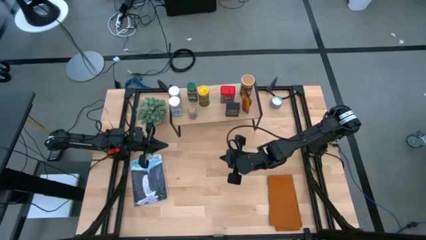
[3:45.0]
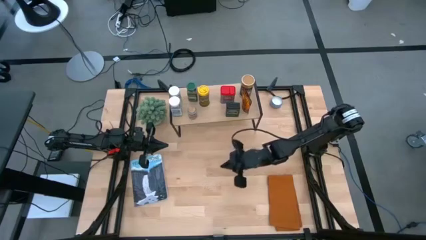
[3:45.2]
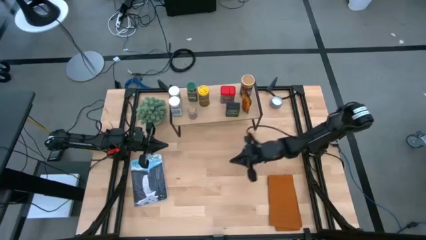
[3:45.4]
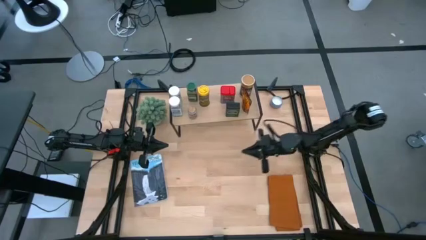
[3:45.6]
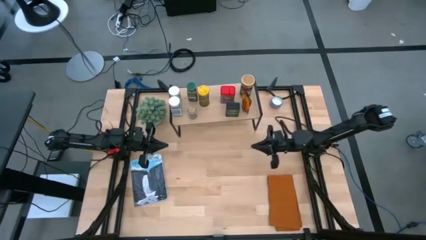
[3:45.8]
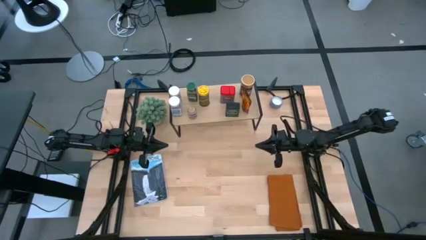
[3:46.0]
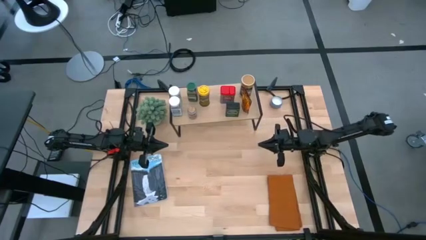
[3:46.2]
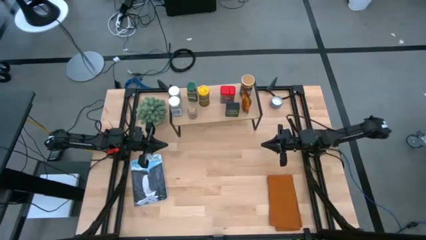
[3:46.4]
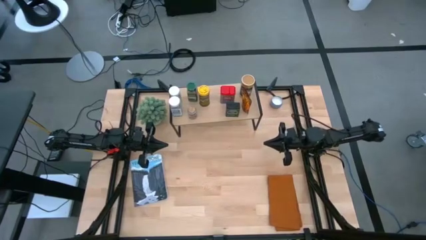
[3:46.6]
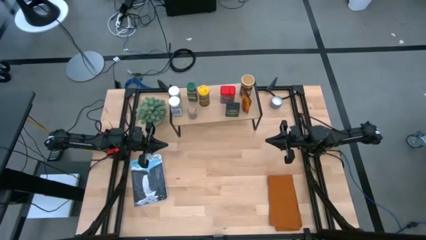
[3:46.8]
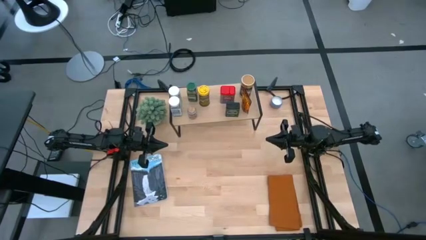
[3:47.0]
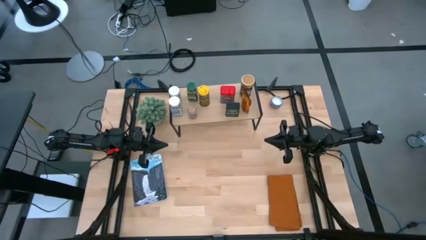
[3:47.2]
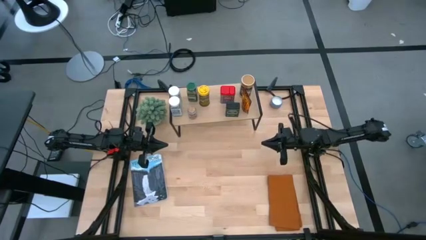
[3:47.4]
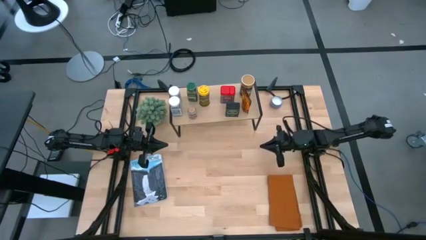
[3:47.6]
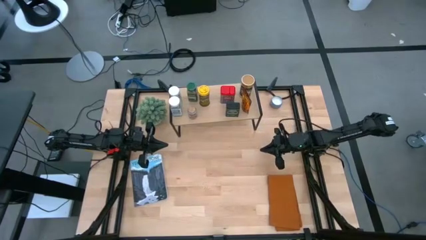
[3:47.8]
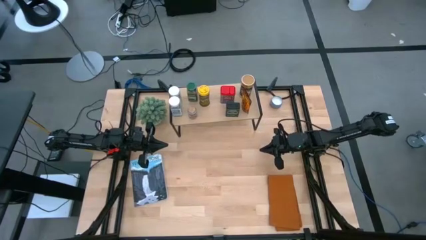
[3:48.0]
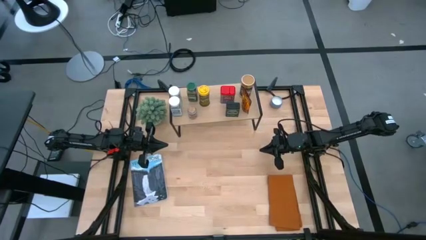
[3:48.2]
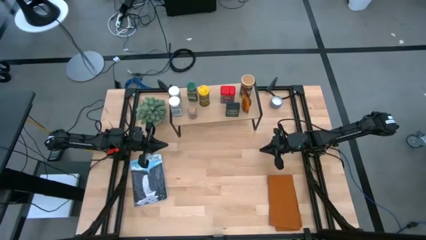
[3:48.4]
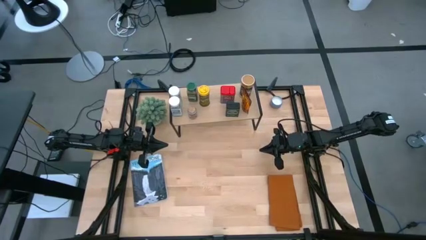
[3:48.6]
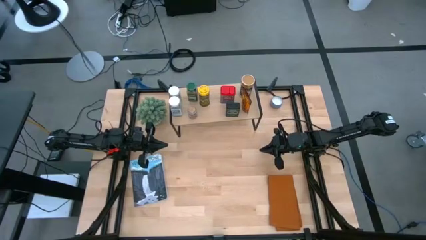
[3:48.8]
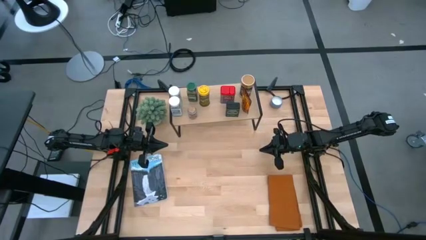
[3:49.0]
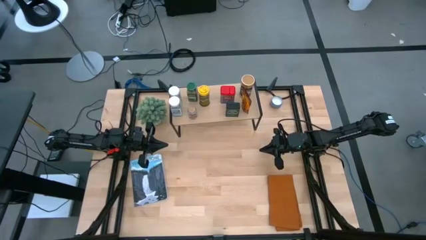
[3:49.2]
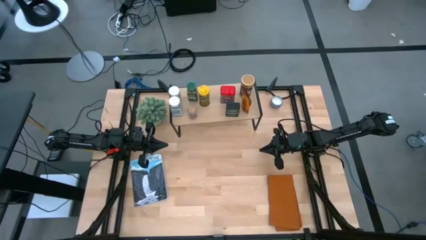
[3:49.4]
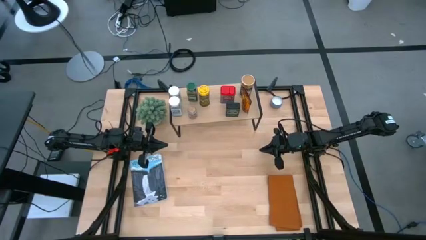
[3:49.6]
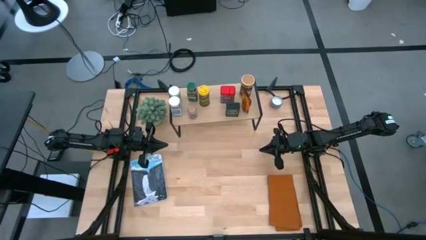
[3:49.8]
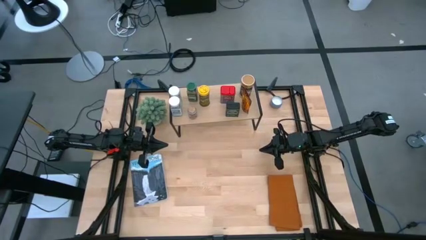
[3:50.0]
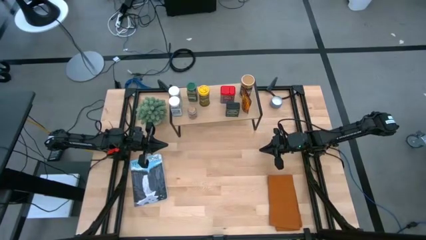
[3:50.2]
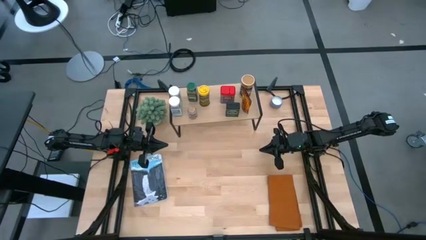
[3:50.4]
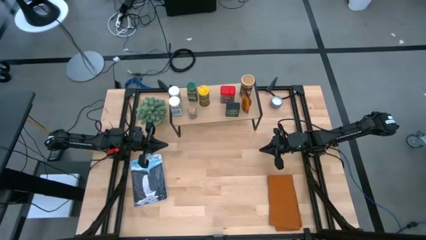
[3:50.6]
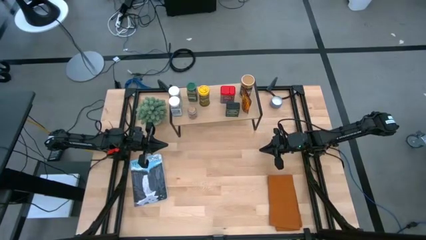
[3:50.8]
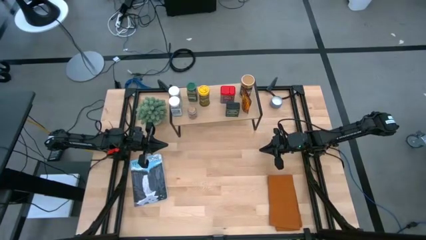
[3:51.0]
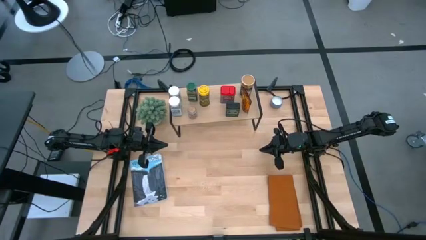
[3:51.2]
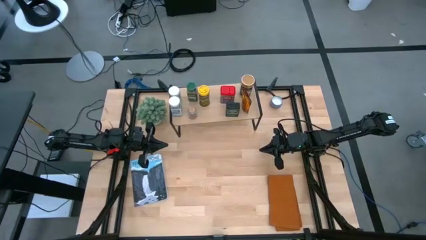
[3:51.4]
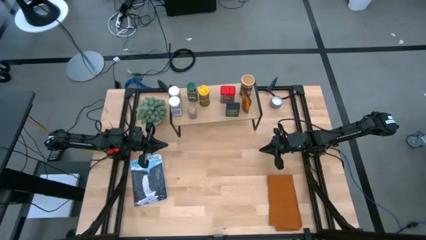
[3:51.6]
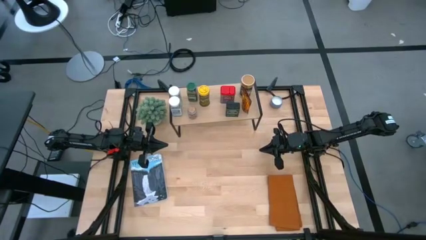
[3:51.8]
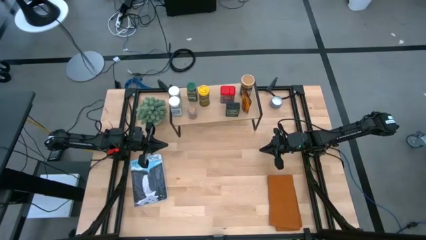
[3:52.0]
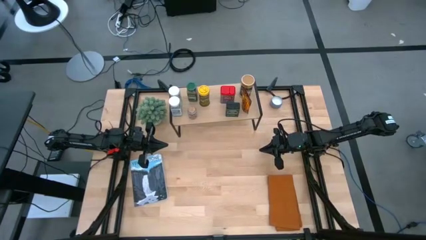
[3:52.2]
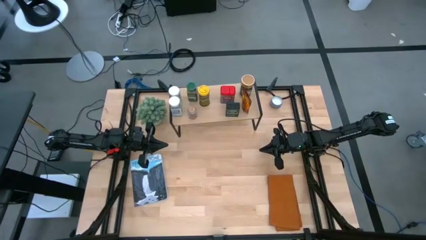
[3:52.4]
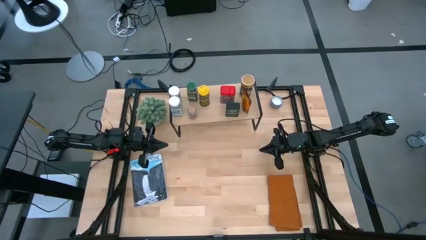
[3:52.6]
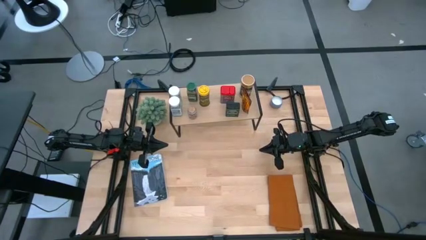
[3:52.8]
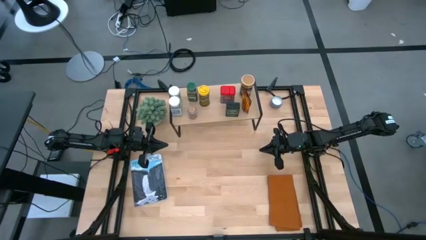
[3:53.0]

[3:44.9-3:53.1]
Task: Shelf spices
Return to Home Position

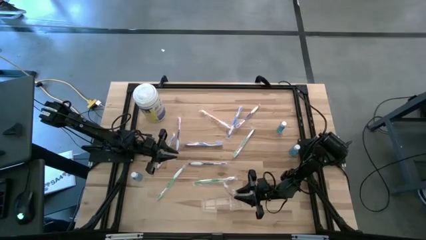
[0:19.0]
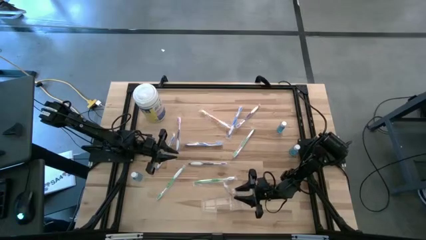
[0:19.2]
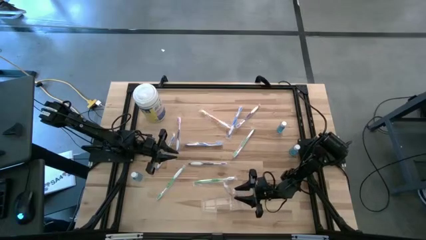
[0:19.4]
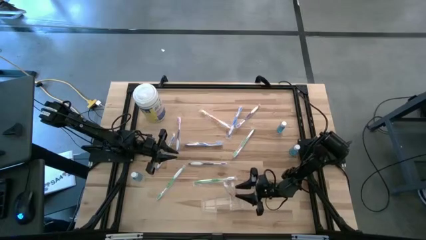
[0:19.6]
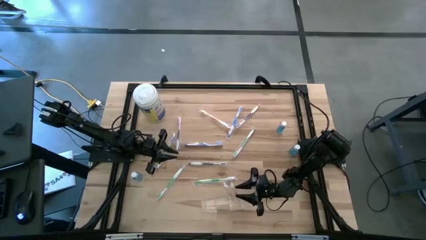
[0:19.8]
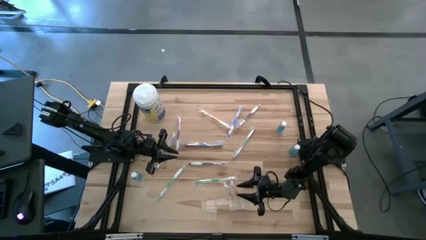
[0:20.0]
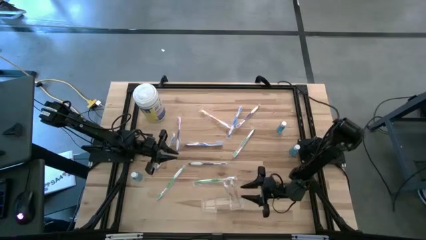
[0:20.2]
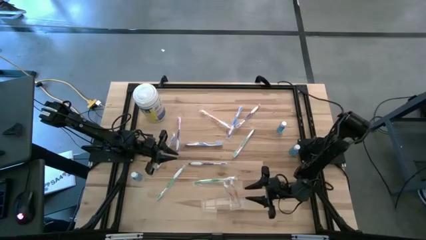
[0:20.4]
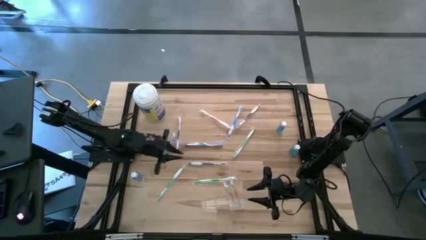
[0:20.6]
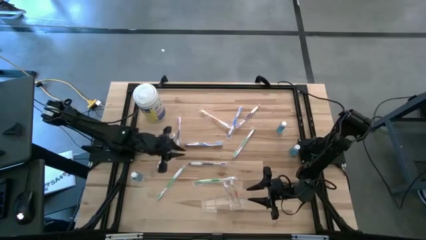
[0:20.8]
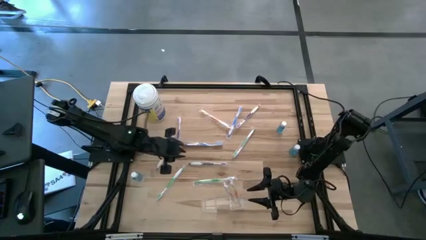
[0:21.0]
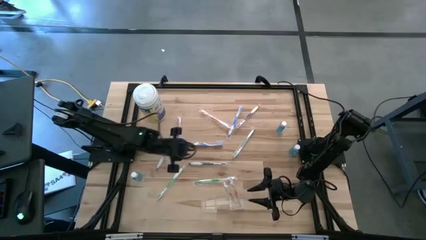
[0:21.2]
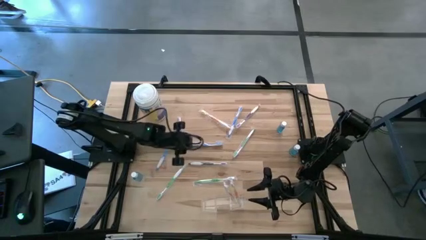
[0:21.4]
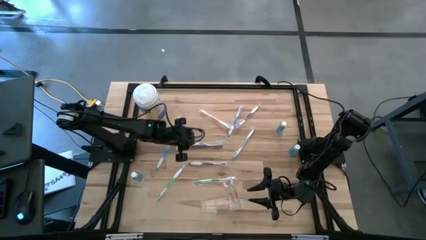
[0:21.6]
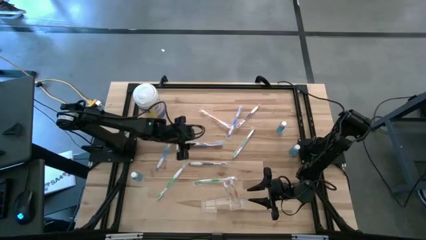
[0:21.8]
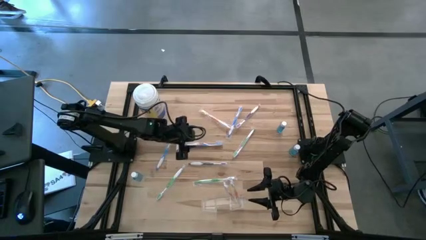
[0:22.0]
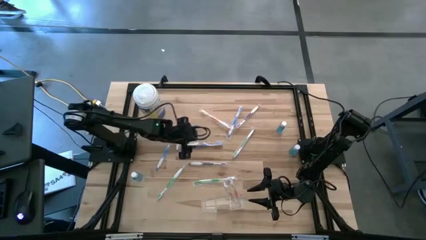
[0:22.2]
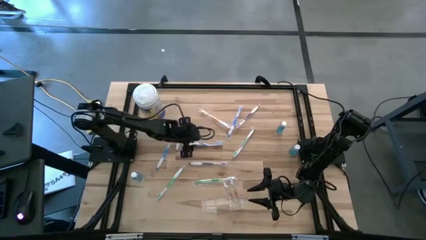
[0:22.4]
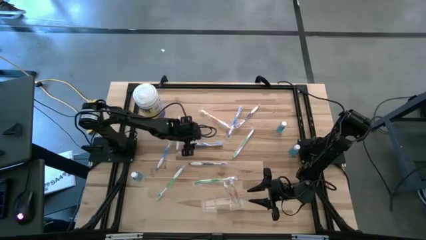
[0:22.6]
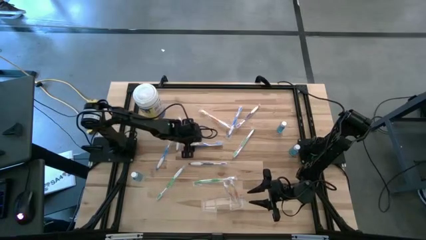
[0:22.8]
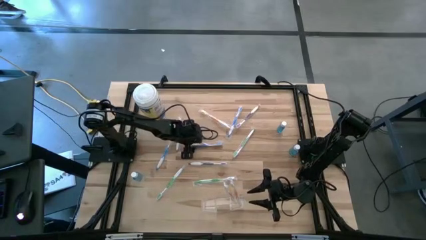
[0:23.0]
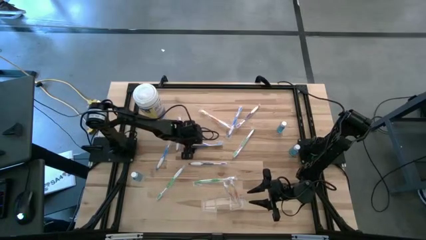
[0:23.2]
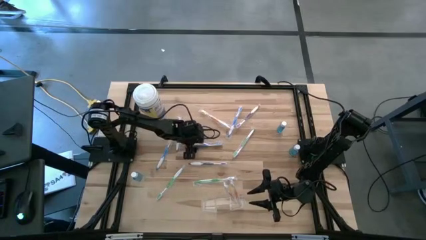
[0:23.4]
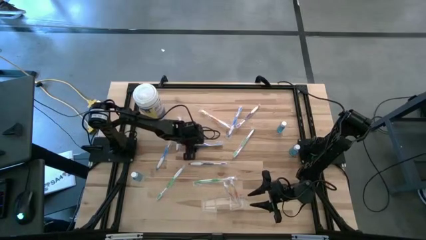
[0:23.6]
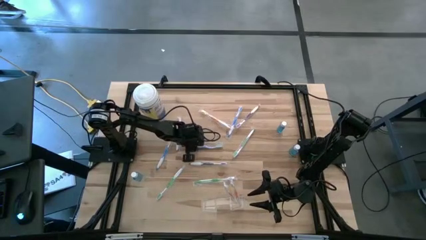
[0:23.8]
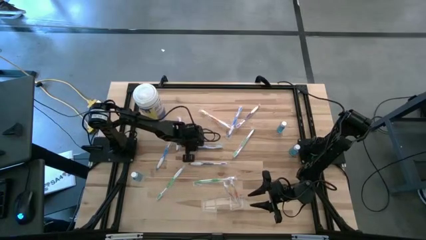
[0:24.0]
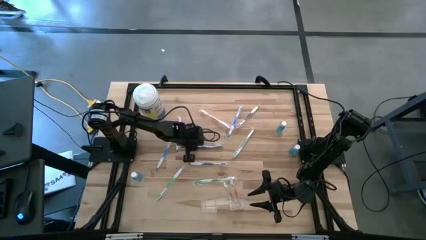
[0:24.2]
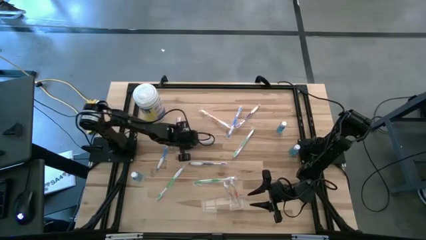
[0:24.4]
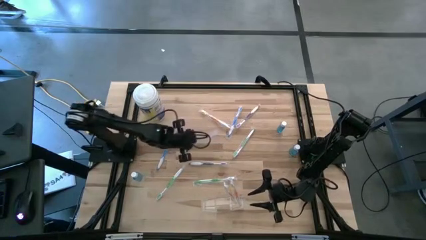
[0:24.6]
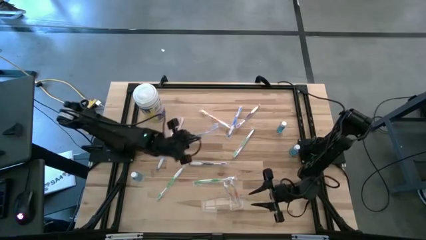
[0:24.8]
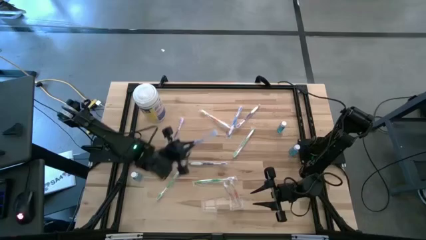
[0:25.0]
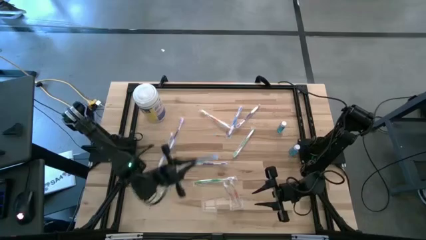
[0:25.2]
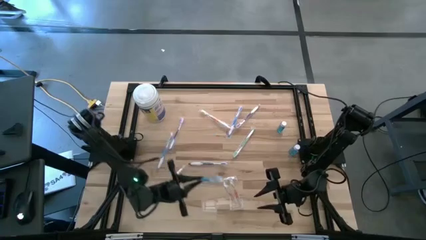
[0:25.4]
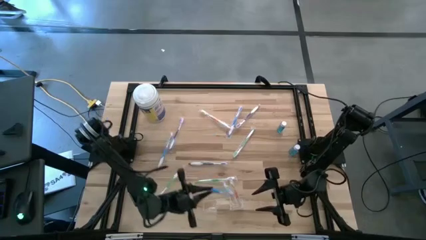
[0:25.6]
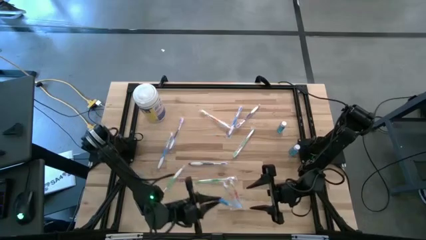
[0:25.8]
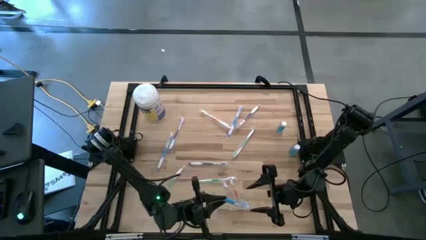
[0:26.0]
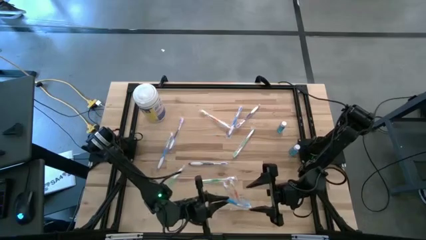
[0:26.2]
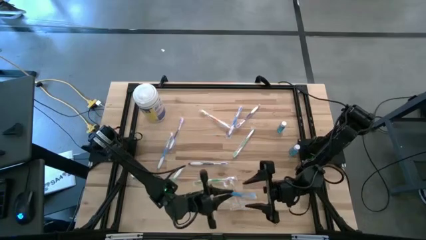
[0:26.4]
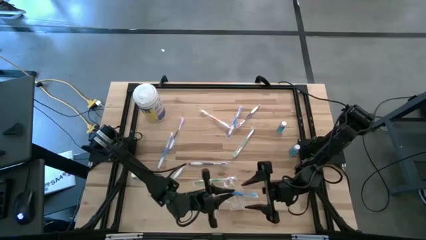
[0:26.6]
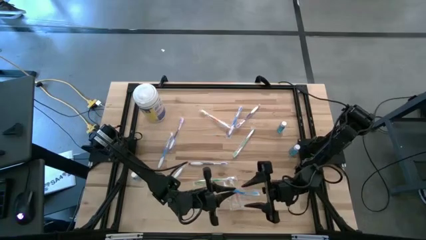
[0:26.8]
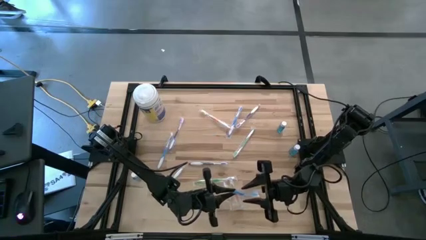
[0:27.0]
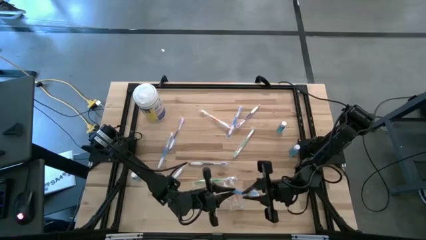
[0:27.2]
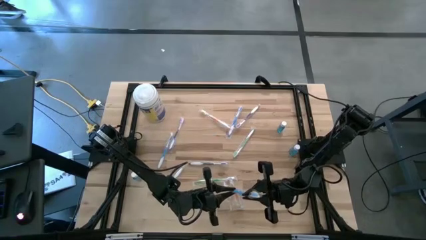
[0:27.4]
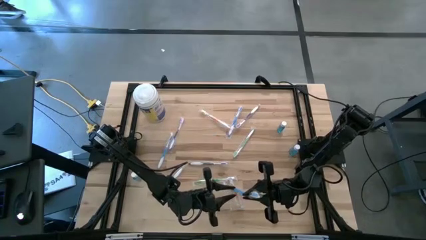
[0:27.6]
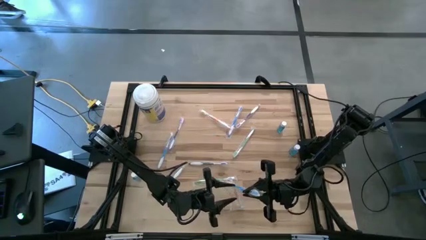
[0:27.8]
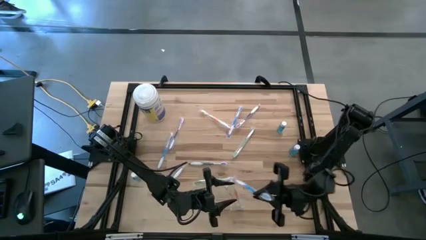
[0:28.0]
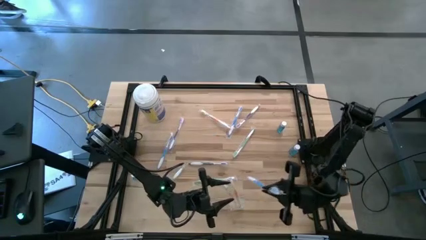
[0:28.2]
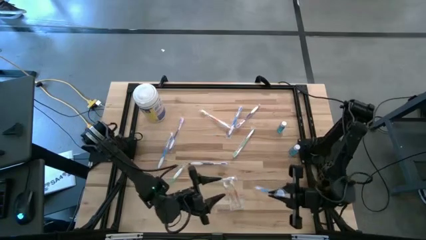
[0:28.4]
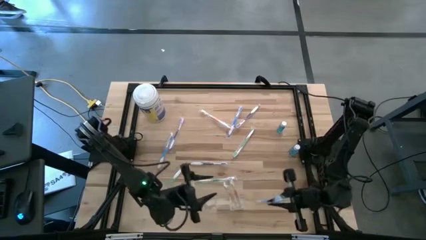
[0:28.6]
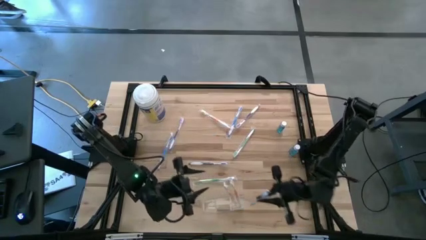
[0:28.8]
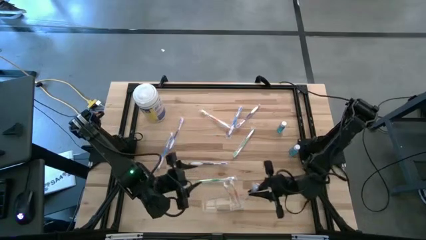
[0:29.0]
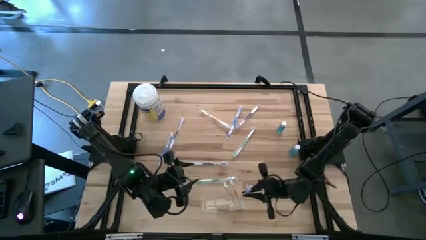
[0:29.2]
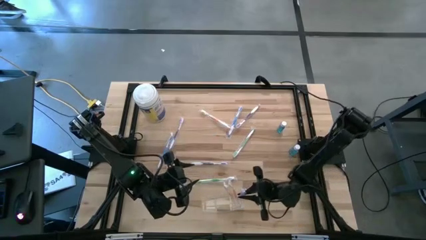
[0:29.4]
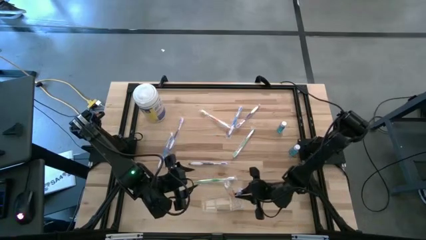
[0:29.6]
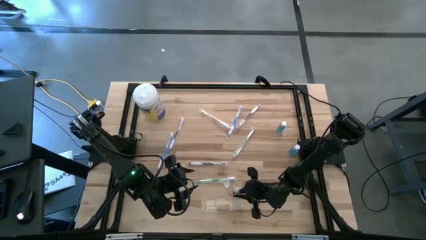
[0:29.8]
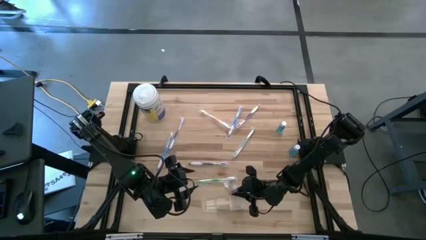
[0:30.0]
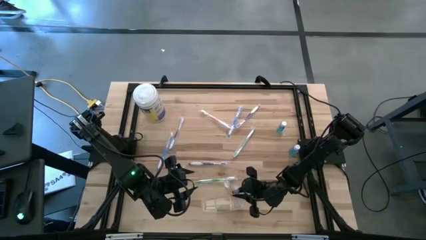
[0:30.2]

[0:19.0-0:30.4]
Task: Pick & Place toothbrushing station
Put the middle blue toothbrush into the transparent bin
